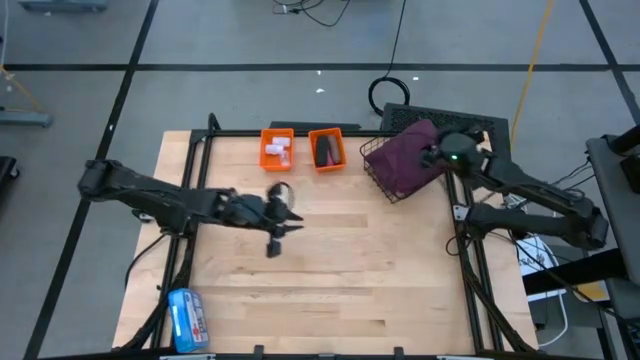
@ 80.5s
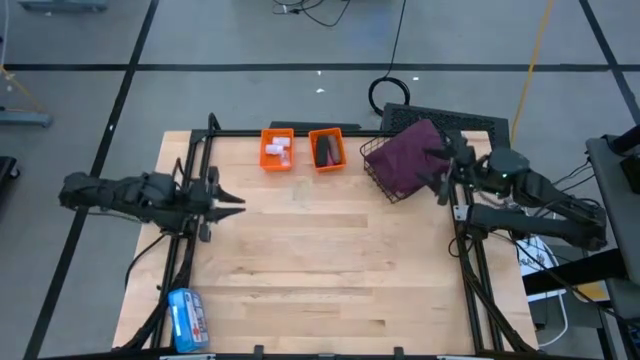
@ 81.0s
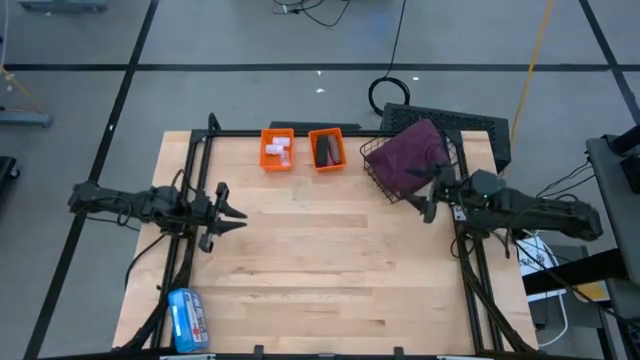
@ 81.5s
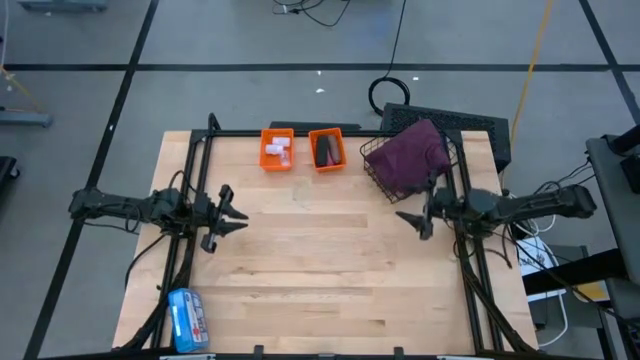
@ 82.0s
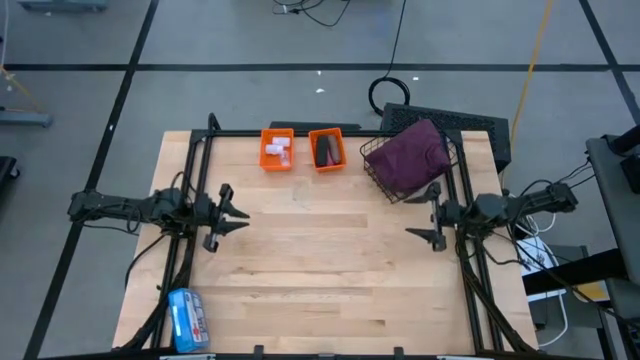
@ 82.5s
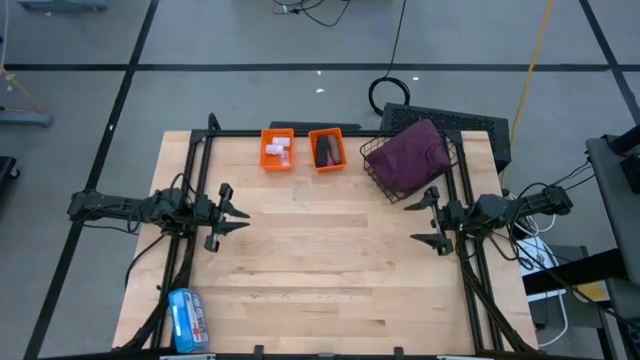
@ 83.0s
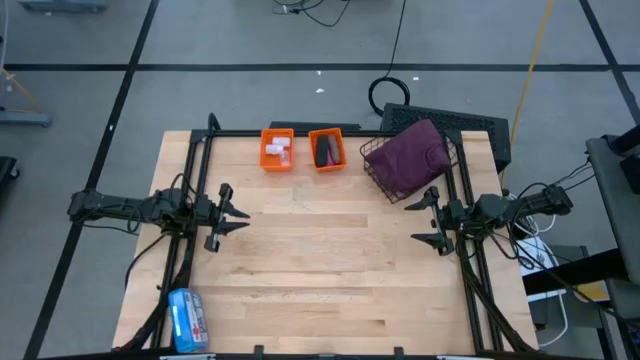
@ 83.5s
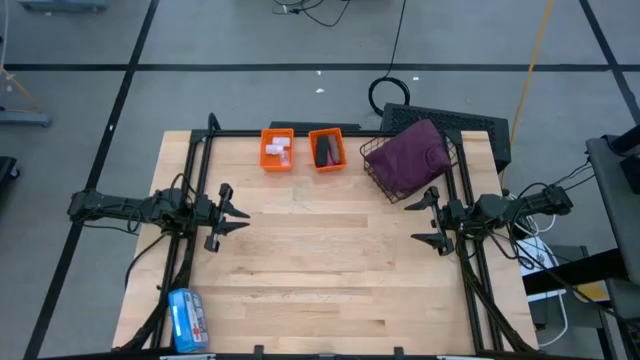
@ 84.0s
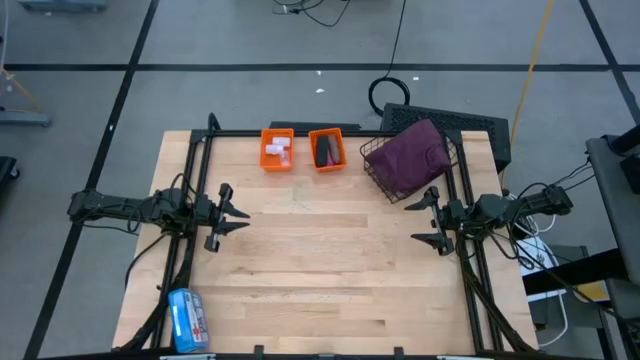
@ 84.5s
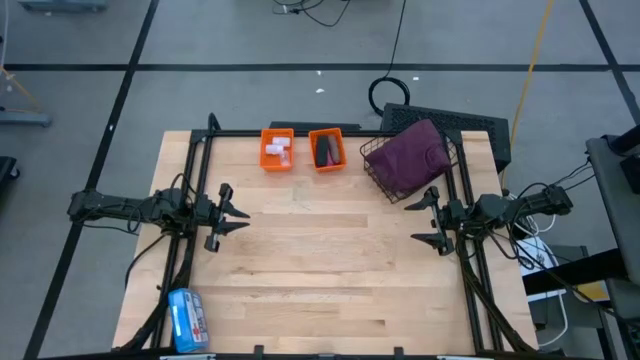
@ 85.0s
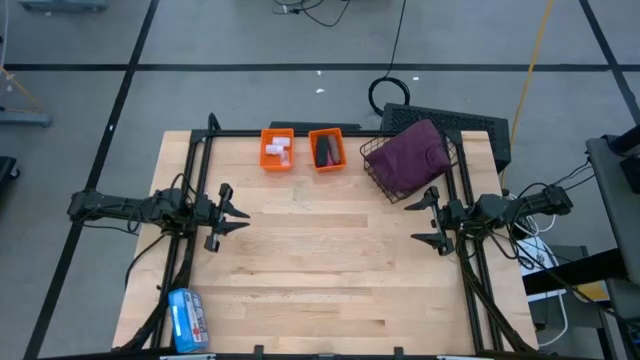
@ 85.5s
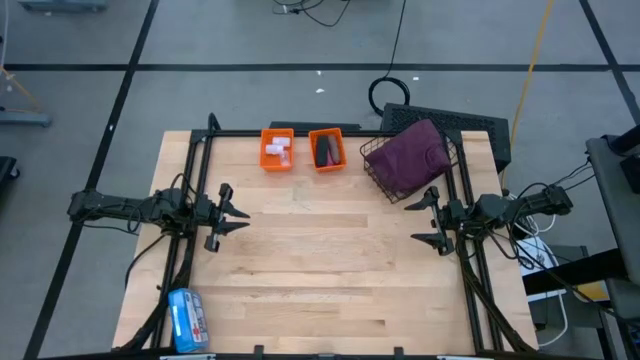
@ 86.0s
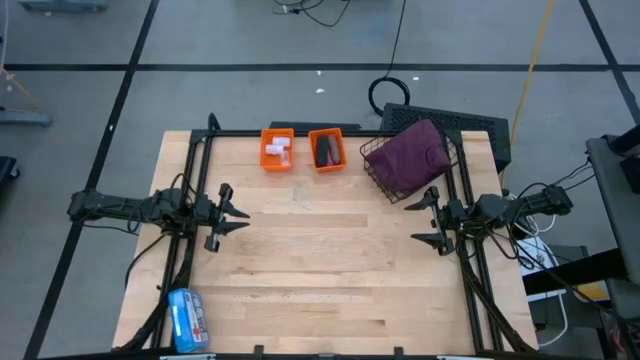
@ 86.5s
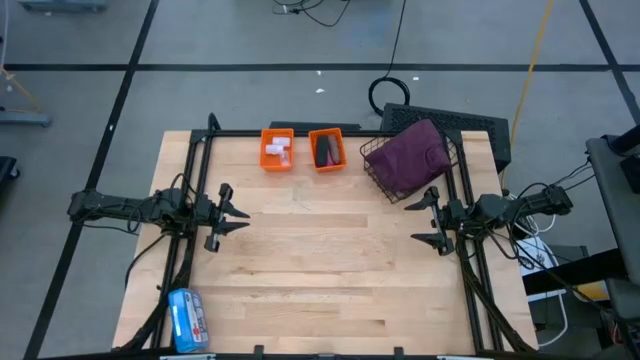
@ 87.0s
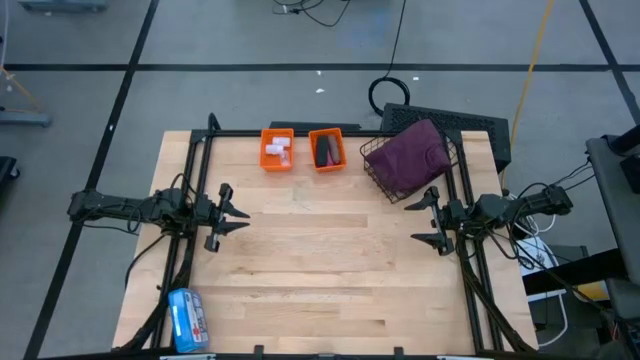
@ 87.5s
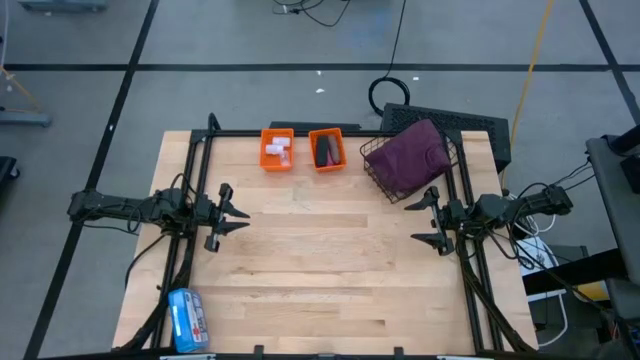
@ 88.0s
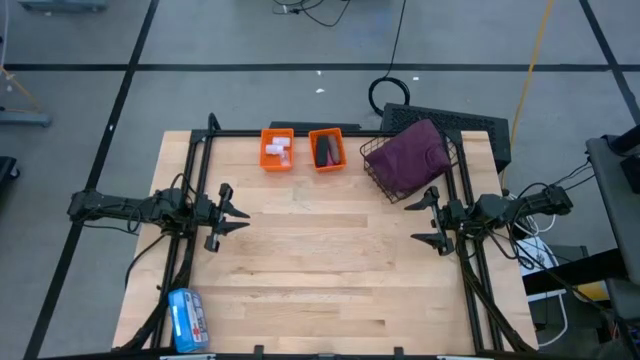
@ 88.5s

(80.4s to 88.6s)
Task: Pick & Place Medicine items
Return to Home Position

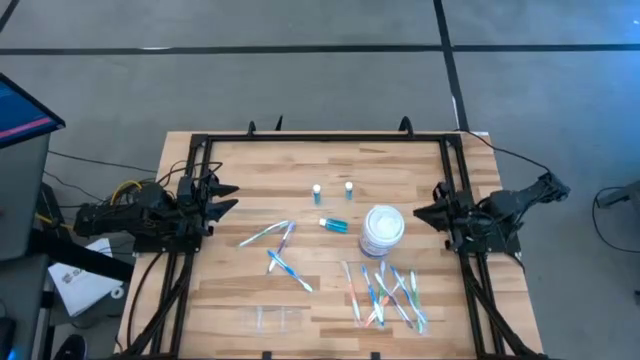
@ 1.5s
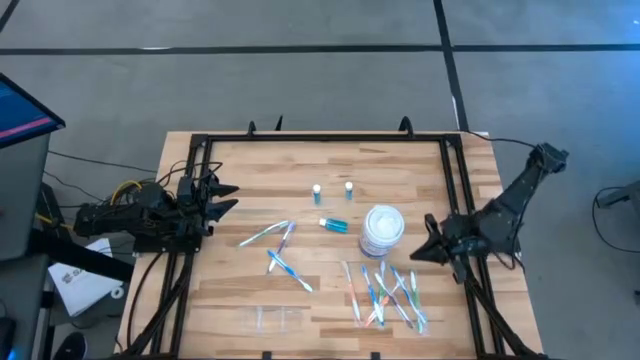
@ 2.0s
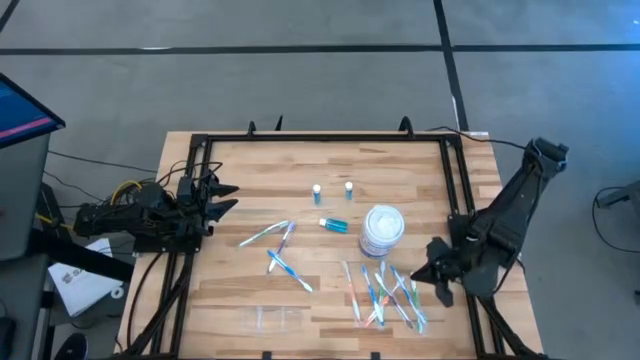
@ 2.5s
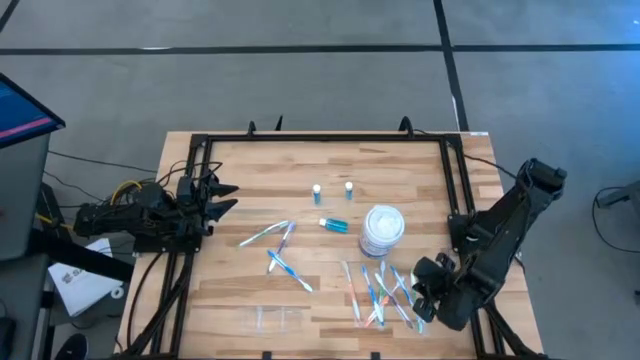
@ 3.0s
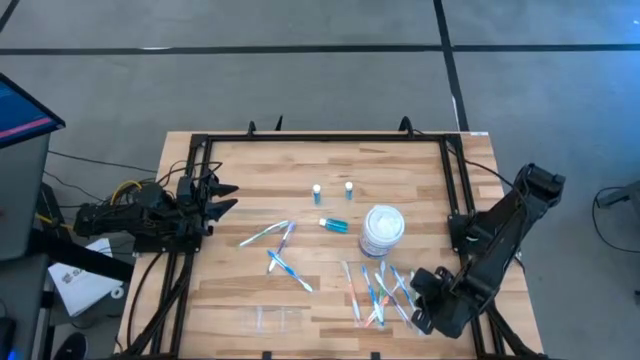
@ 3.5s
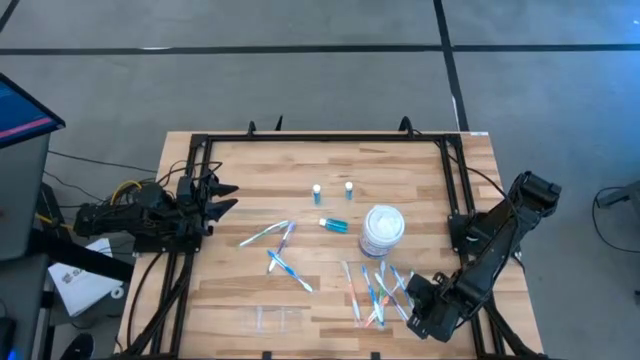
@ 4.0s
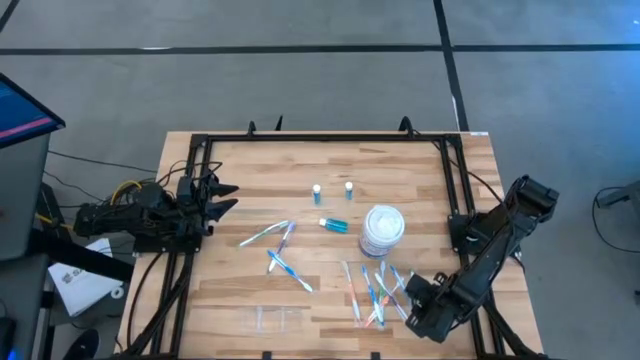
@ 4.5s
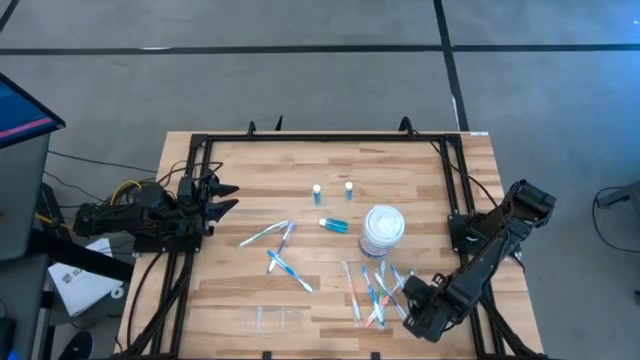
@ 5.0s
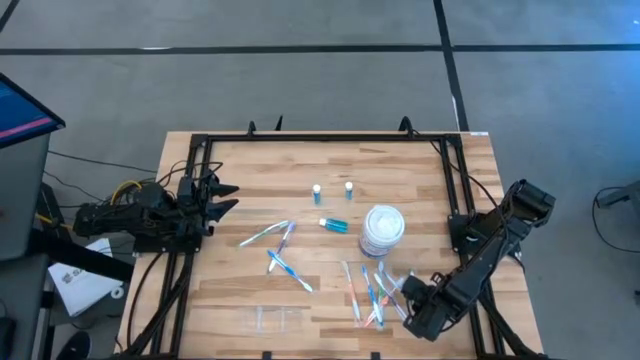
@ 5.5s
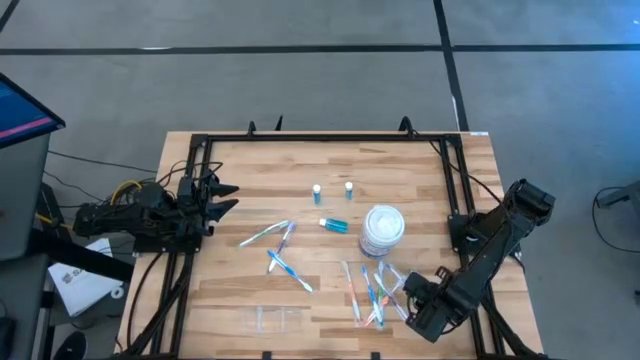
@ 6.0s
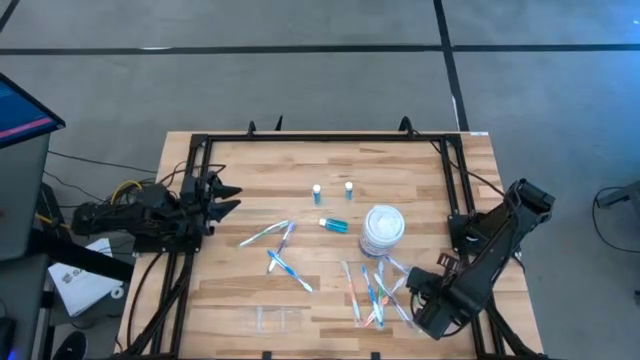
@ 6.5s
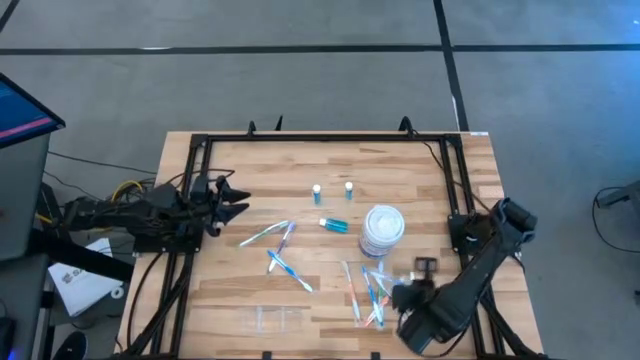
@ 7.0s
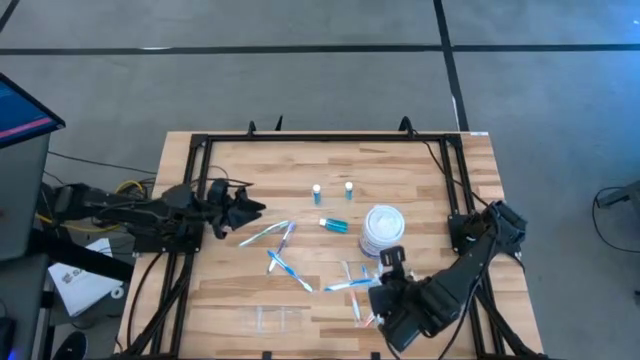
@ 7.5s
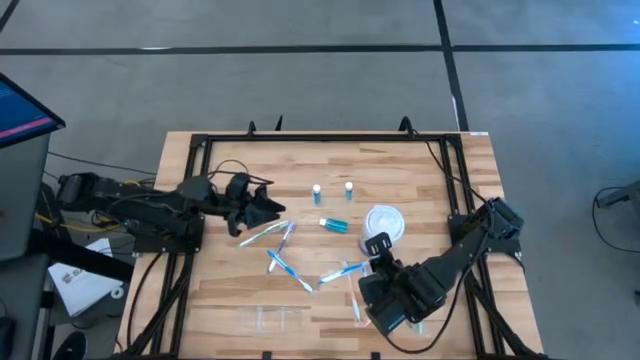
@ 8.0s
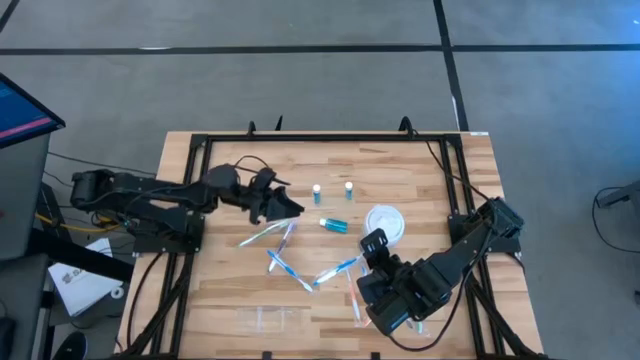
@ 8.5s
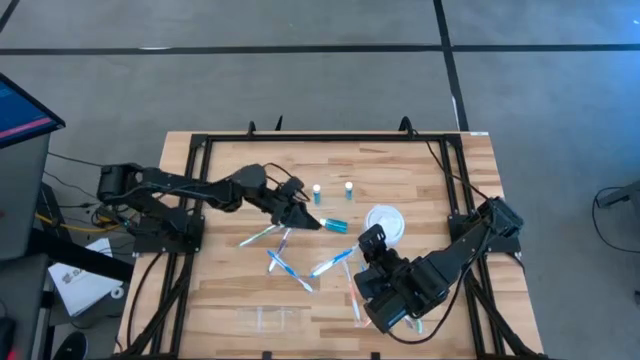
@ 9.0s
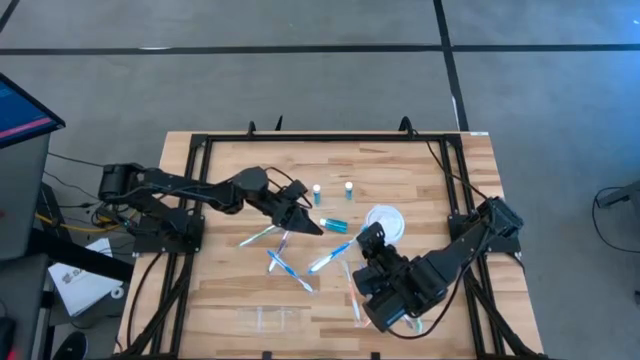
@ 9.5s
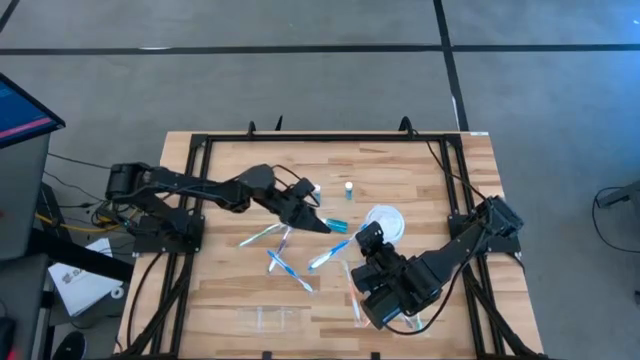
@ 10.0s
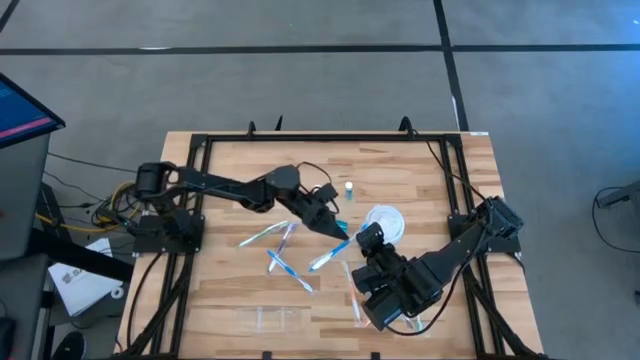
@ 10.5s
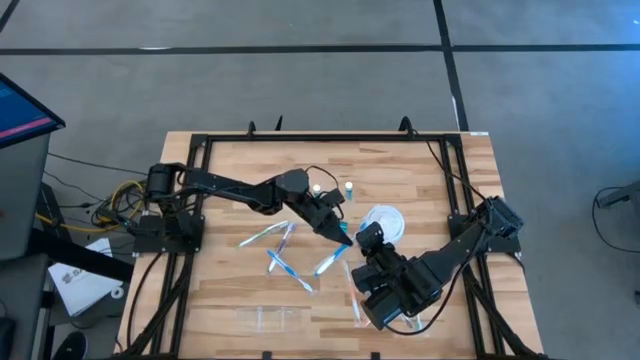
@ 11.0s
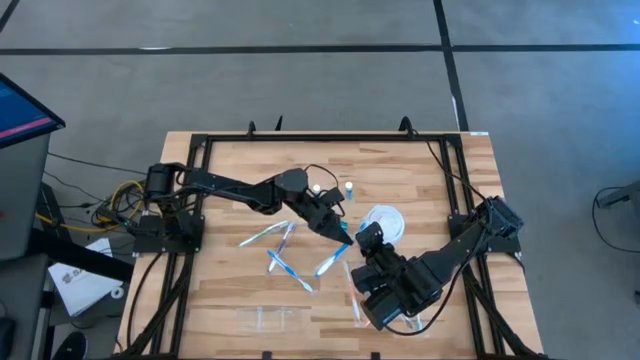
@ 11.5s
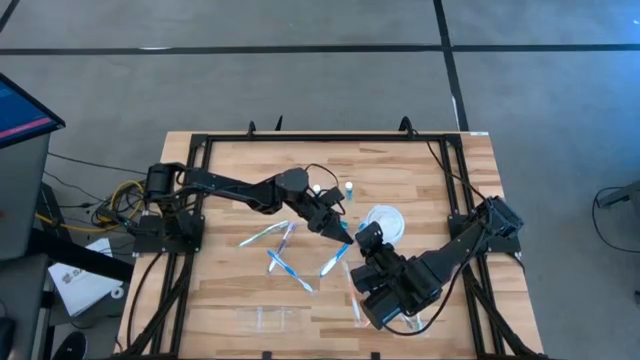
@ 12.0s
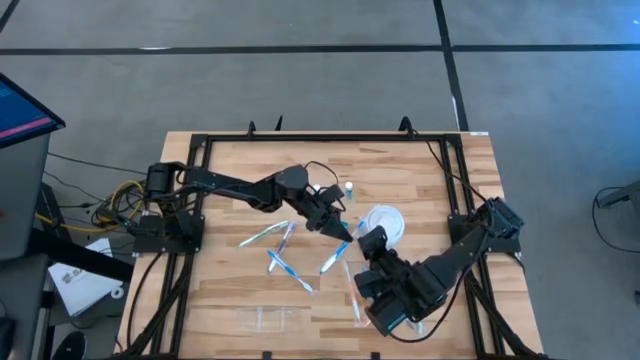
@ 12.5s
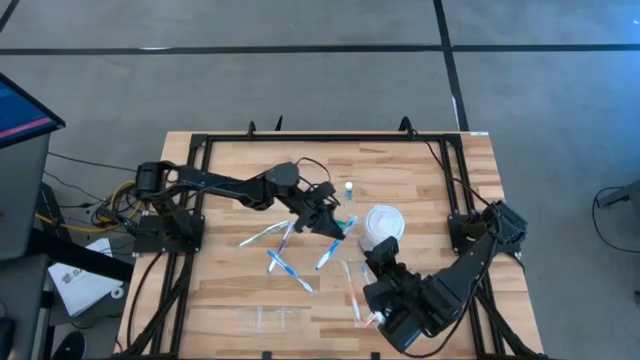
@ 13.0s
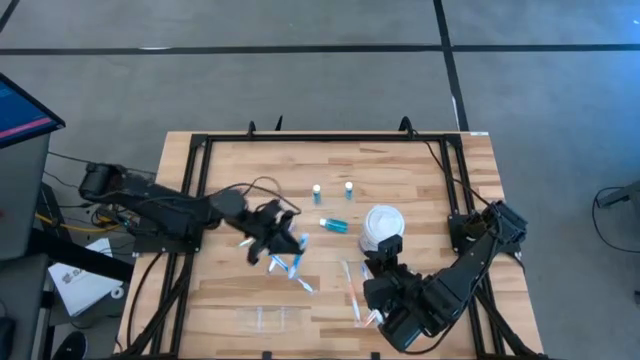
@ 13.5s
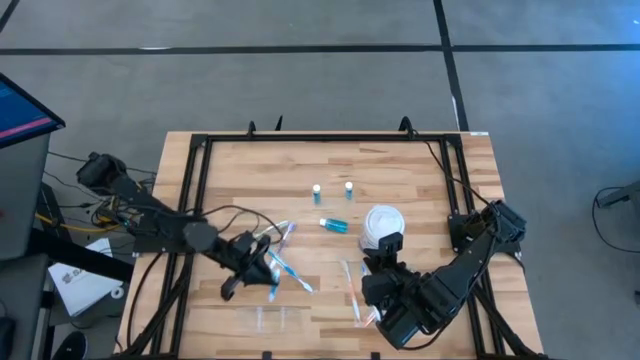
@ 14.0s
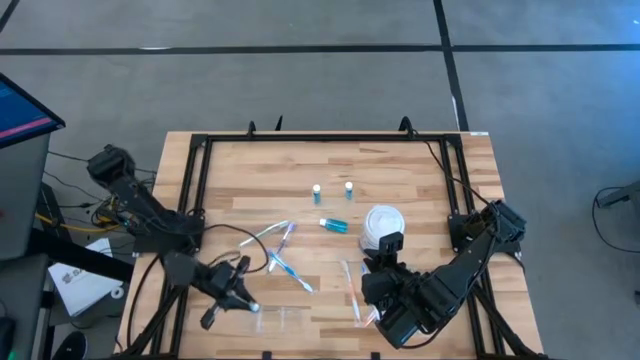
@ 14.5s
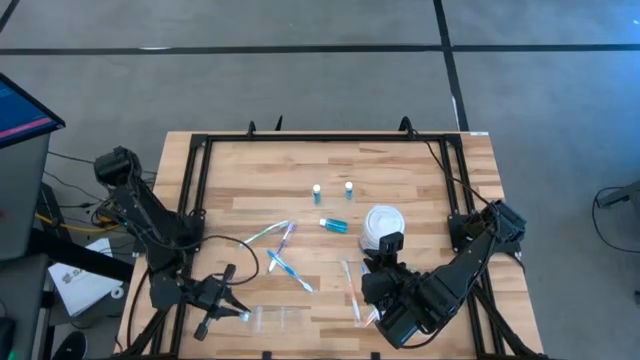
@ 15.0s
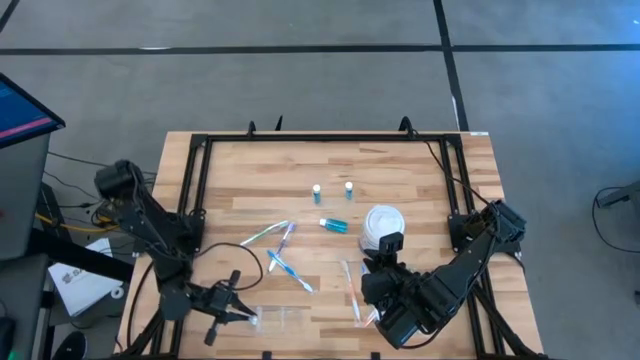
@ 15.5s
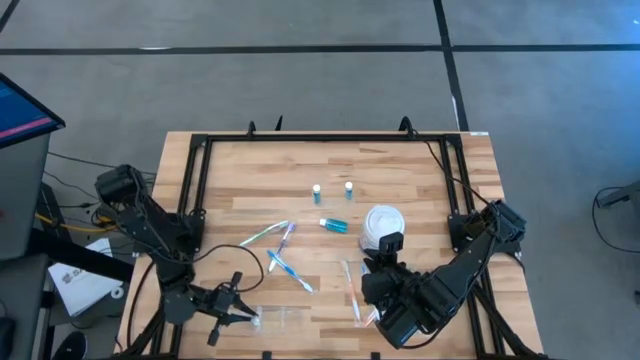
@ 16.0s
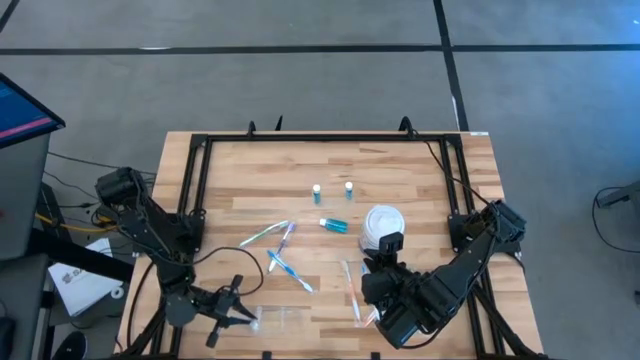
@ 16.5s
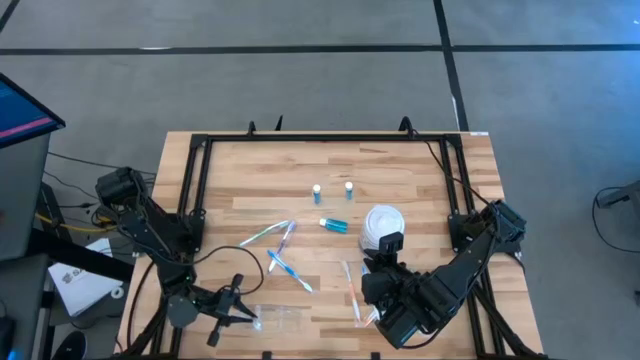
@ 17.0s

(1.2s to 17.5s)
Task: Pick & Place toothbrushing station
Put the right blue toothbrush into the transparent organizer
